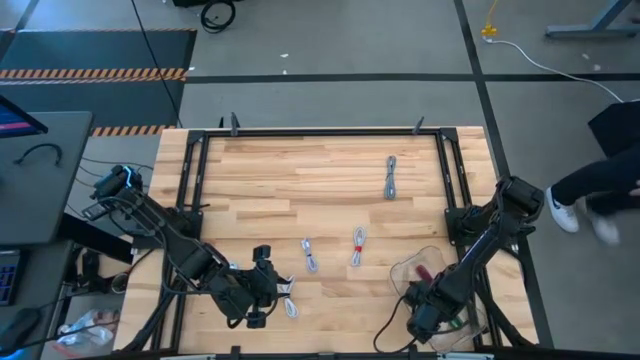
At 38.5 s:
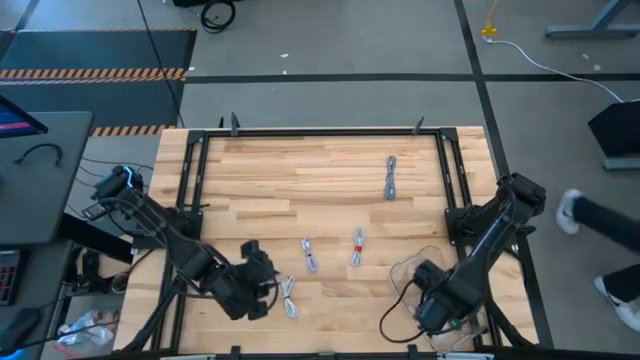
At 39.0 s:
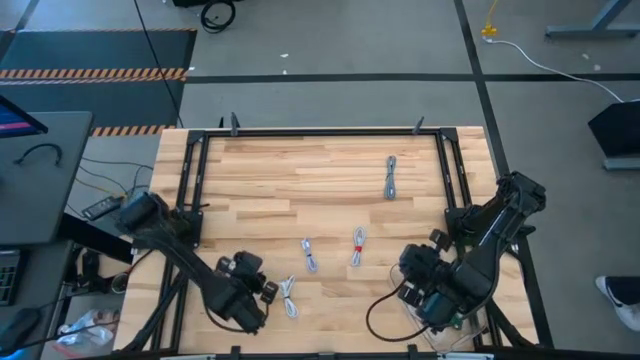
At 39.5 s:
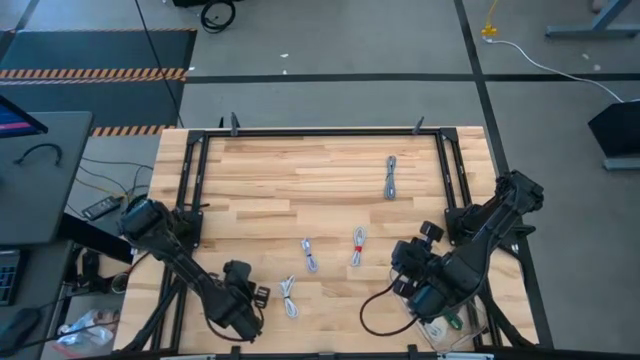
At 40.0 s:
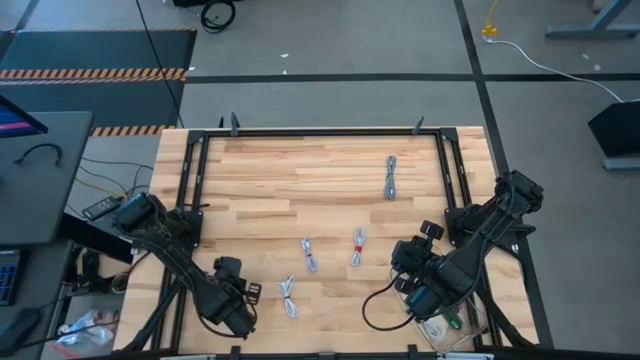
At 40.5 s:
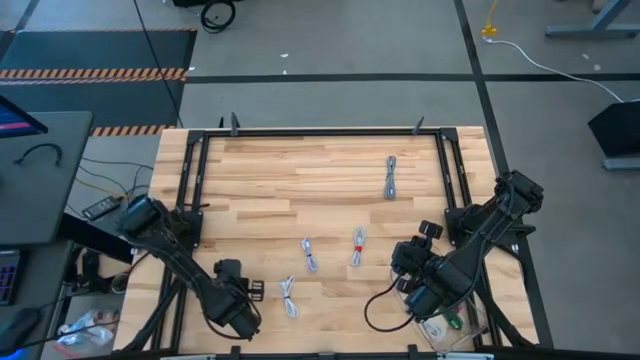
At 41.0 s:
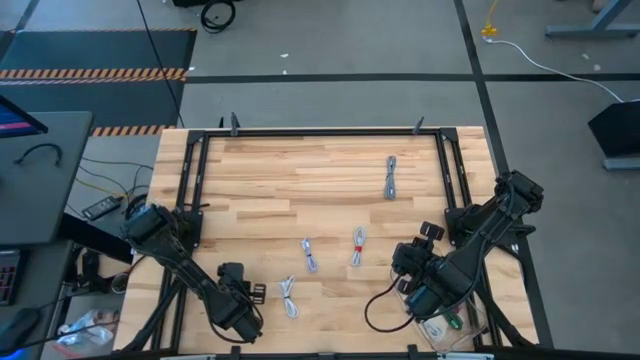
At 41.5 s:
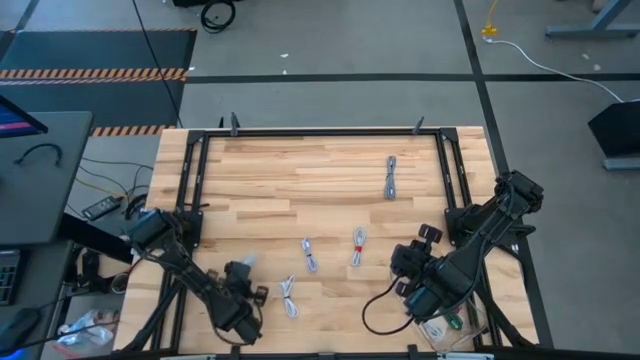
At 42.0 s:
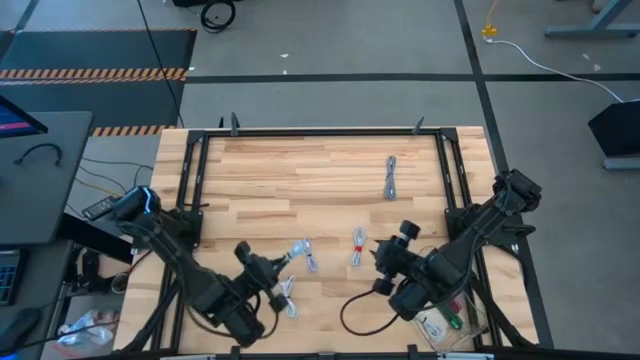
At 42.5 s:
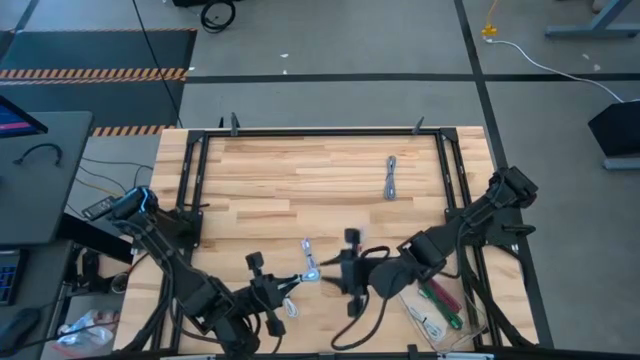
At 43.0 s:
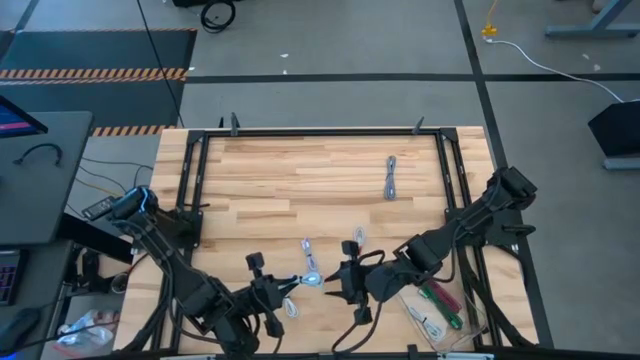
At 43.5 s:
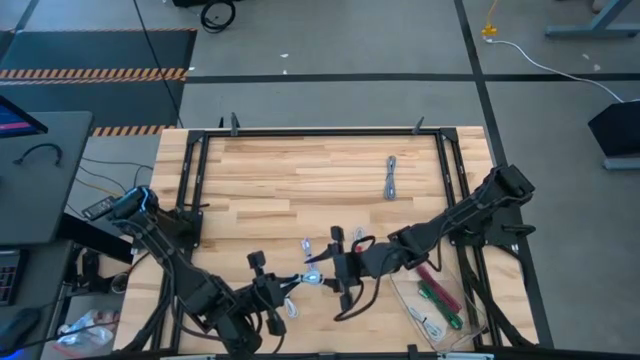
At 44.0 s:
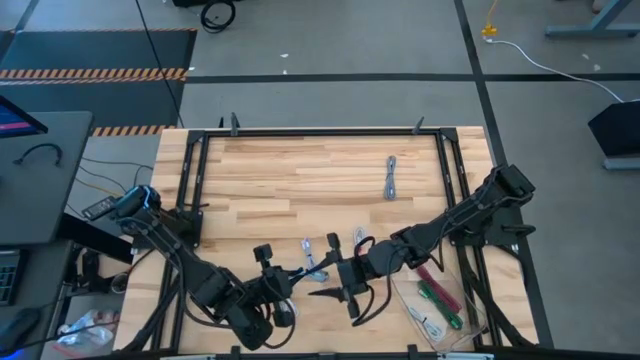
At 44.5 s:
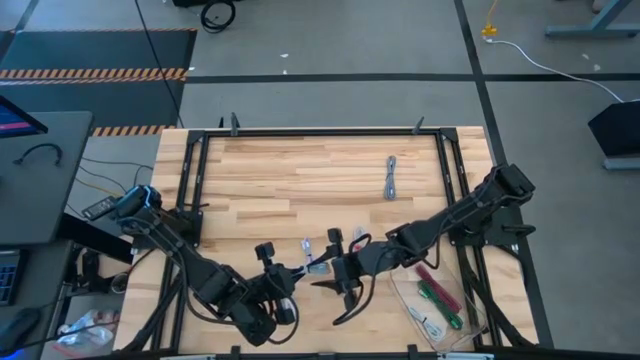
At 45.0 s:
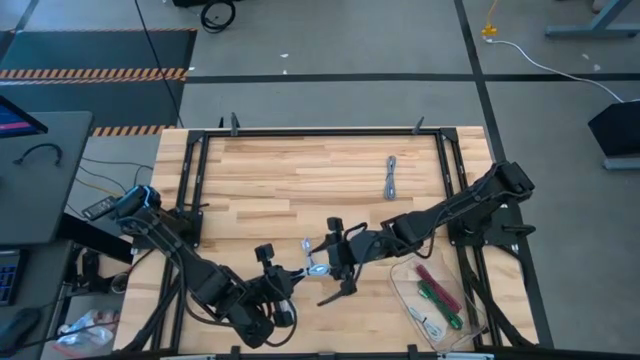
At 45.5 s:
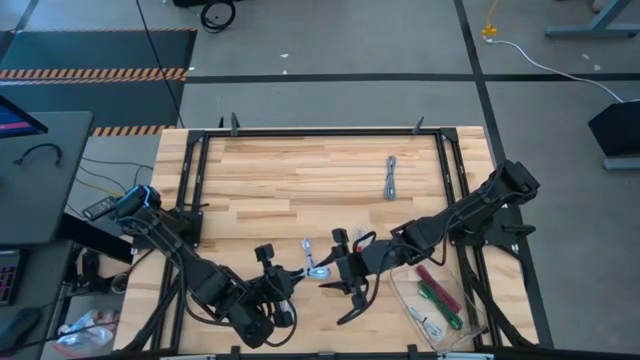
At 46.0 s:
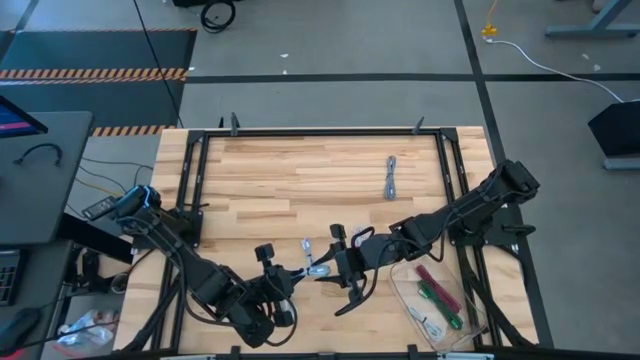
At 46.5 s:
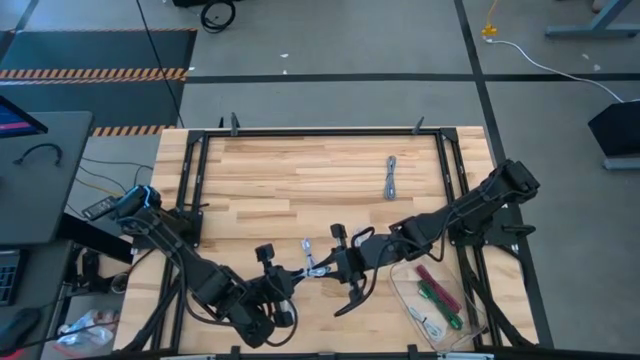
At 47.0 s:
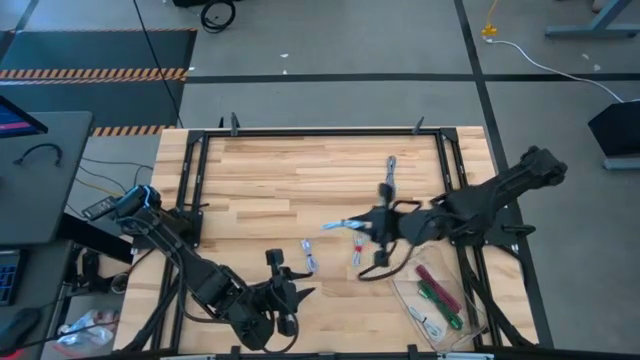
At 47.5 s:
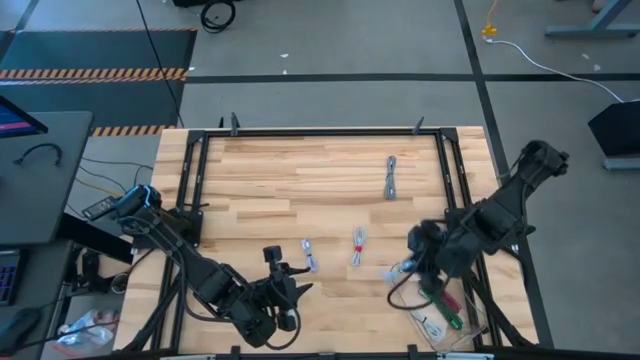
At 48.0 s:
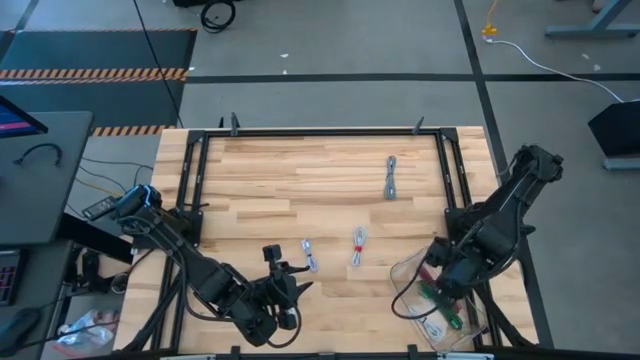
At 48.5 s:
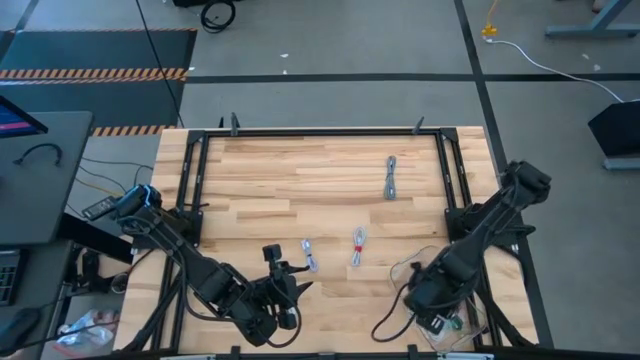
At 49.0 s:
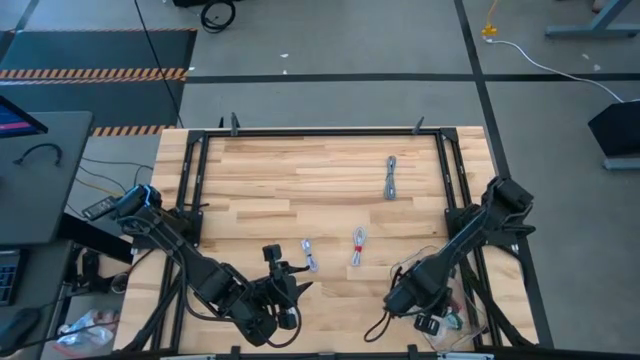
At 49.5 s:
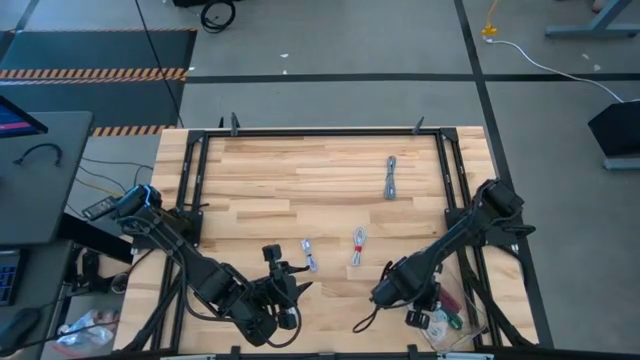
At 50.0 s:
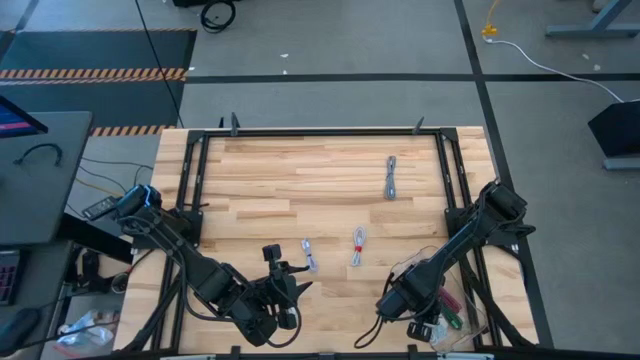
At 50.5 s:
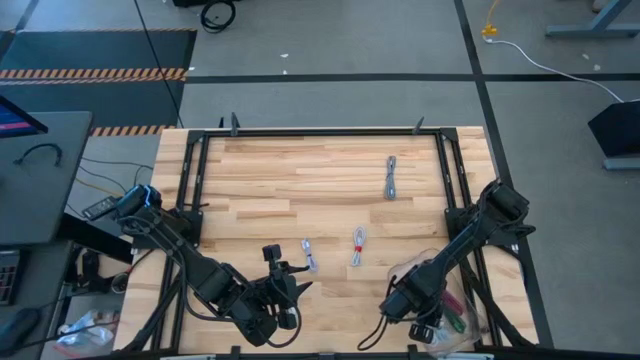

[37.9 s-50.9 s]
Task: Pick and place USB-C Cables
Put the blue charger cable into the transparent bin

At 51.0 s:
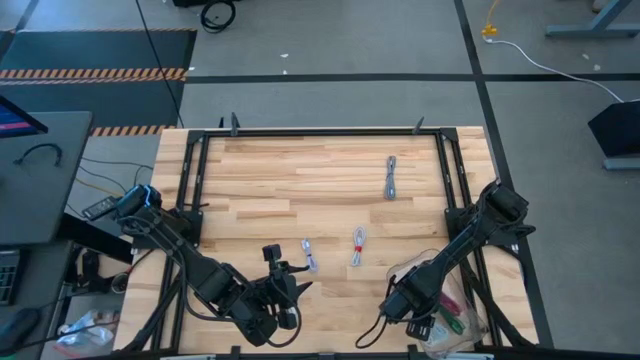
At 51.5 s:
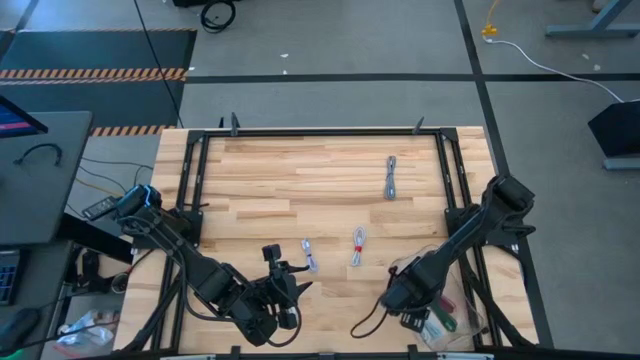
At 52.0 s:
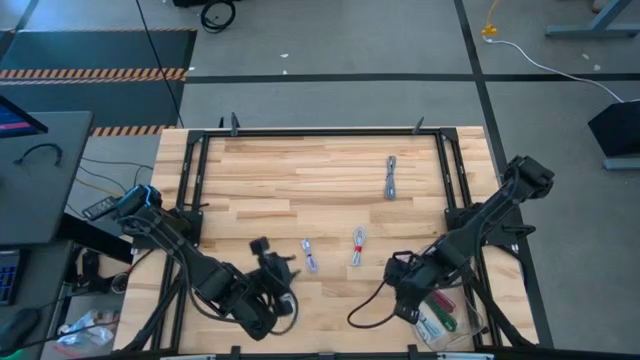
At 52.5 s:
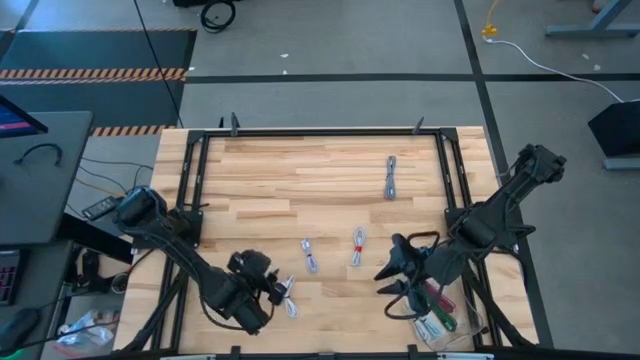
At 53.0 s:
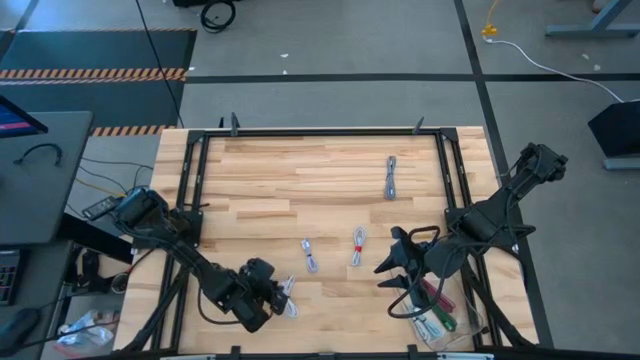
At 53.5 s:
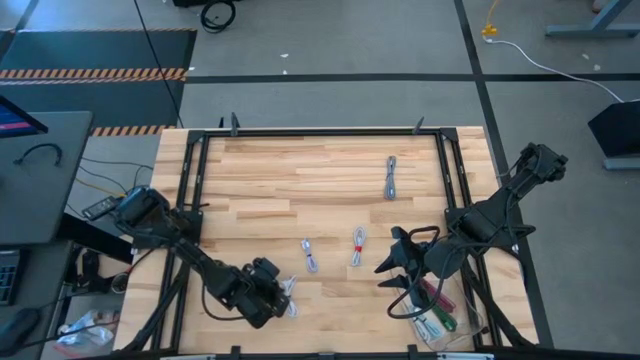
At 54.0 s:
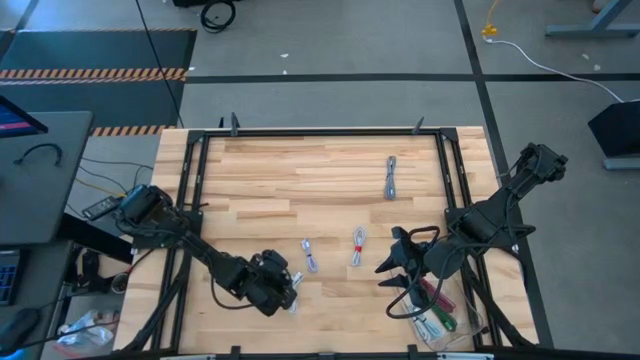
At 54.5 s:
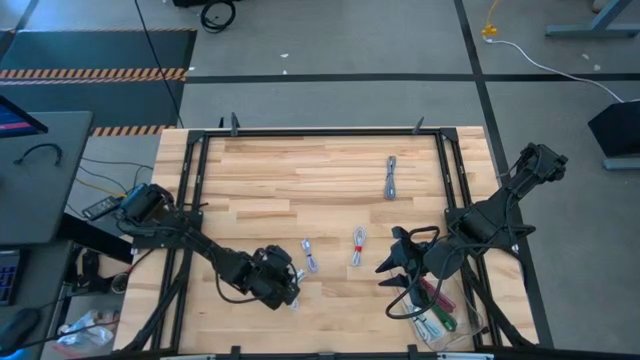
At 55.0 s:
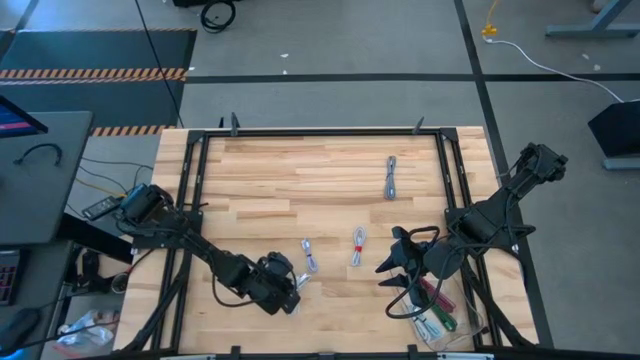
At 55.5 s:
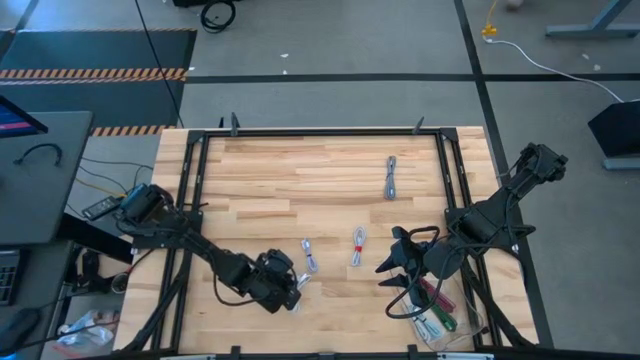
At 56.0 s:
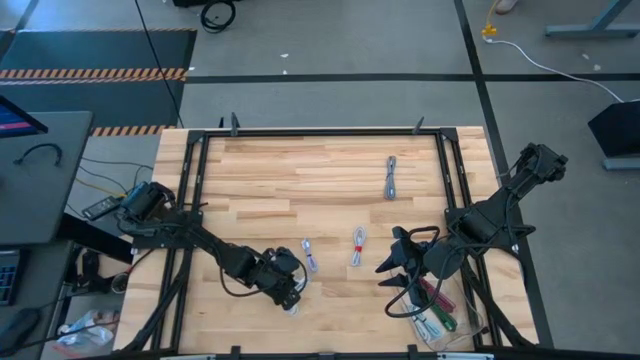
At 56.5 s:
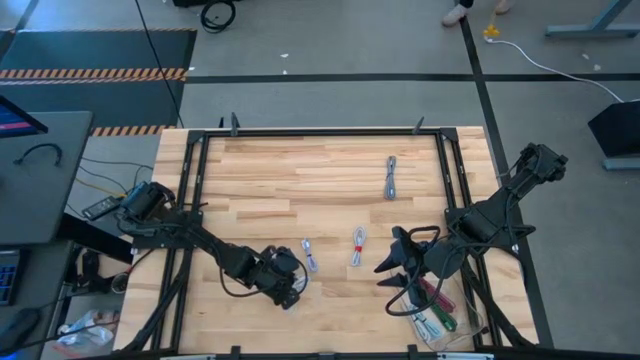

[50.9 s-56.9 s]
Put the bottom white charger cable into the transparent bin

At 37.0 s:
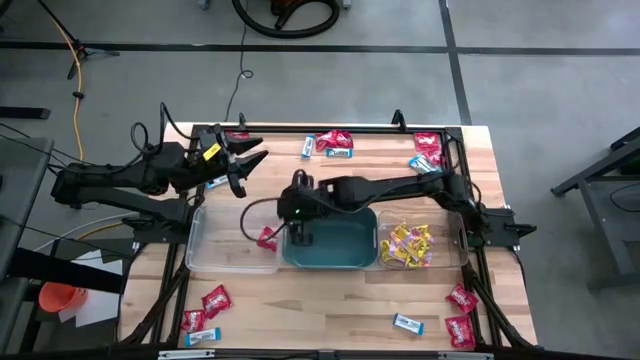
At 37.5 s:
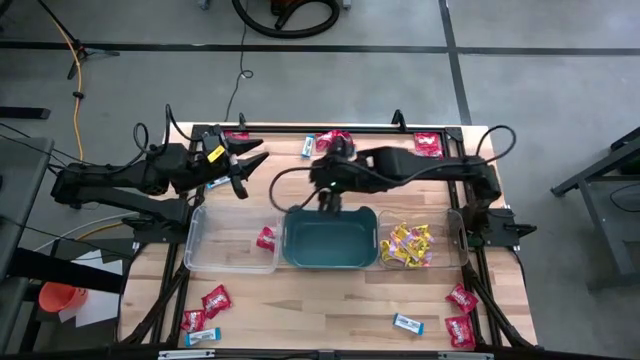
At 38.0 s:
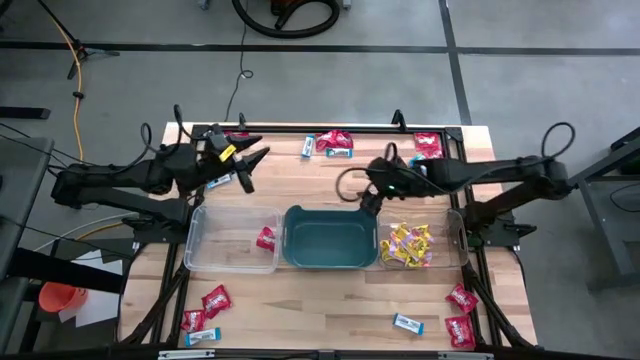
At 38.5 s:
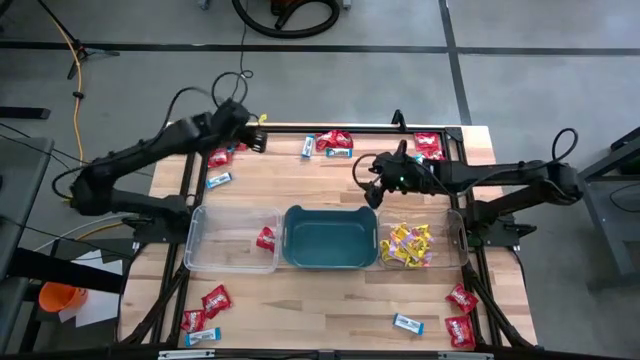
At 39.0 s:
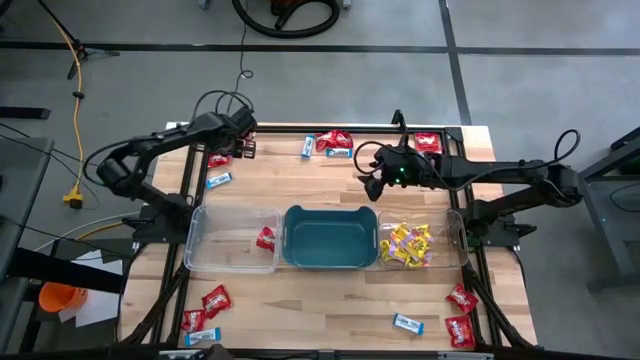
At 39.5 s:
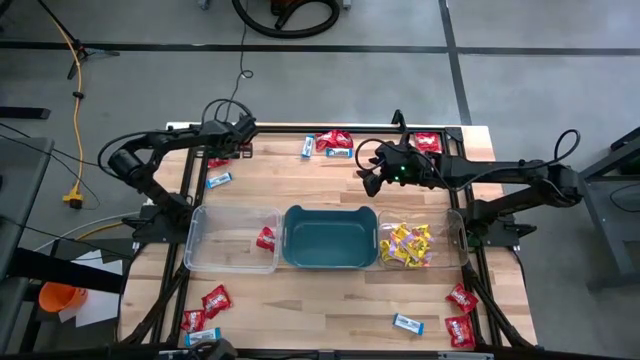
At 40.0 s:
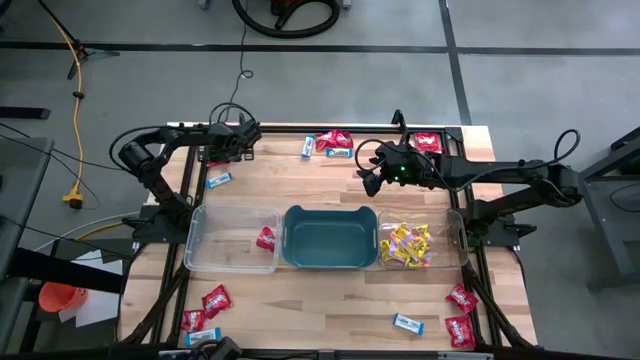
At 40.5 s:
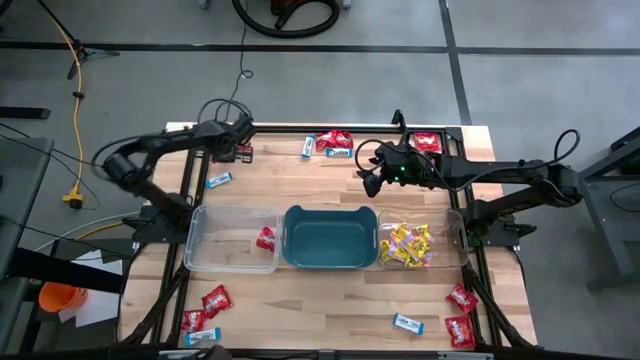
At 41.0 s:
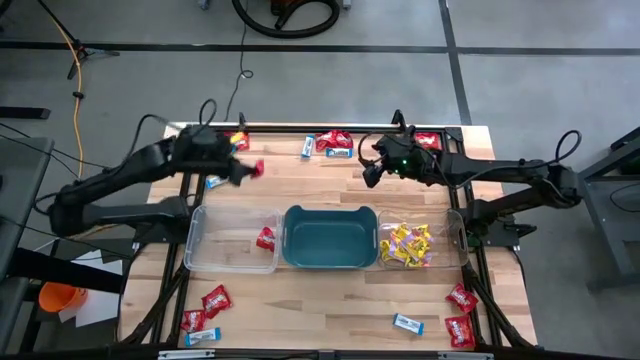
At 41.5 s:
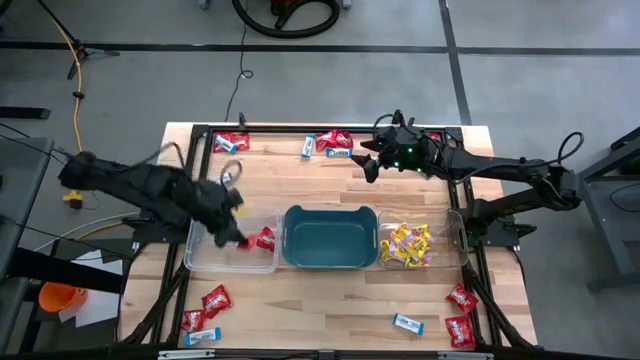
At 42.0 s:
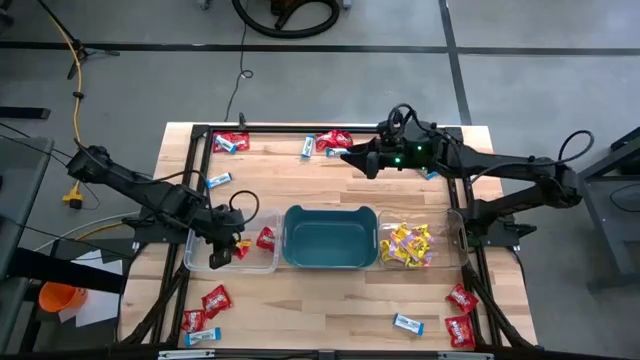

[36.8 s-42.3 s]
Task: Sort candy
Put the red candy into the left transparent bin
